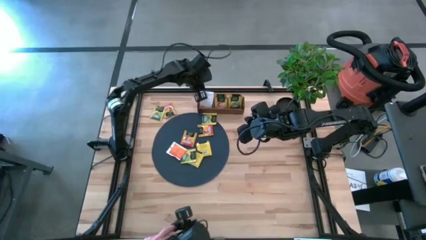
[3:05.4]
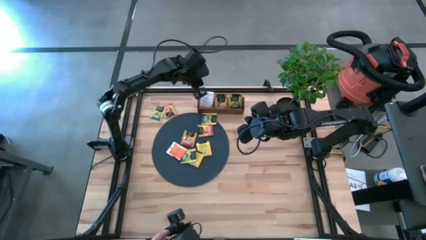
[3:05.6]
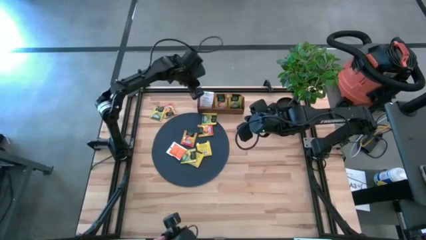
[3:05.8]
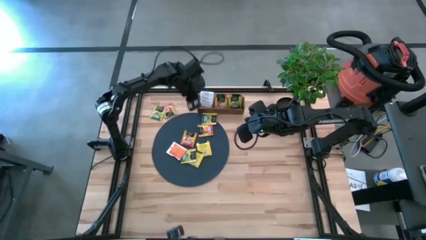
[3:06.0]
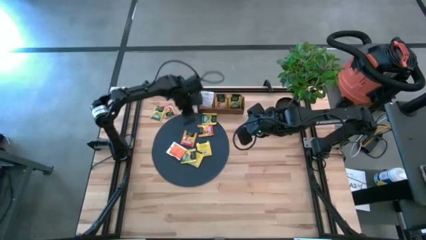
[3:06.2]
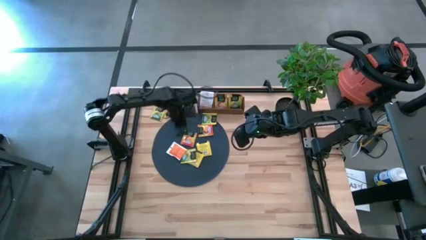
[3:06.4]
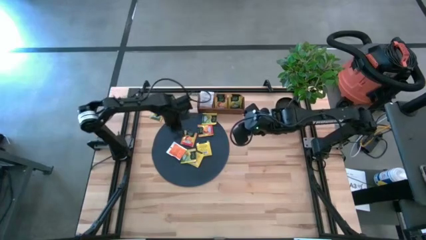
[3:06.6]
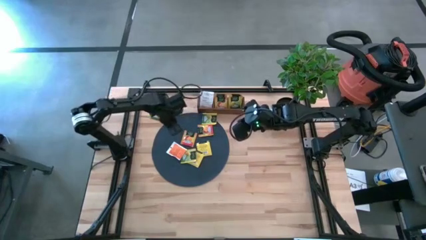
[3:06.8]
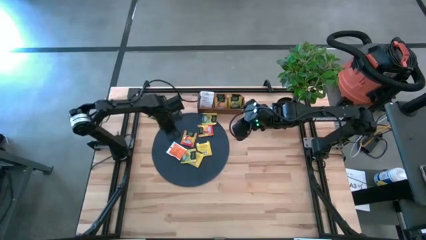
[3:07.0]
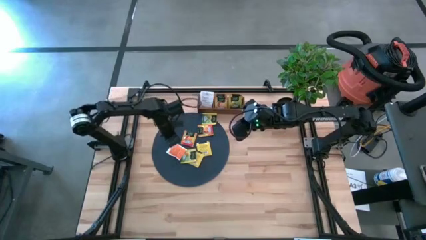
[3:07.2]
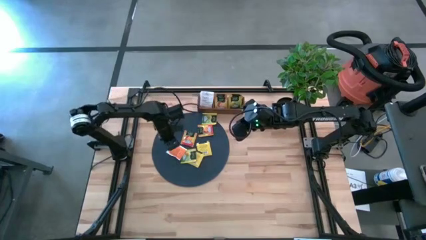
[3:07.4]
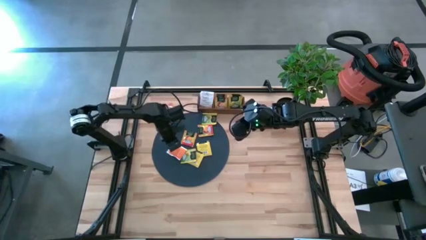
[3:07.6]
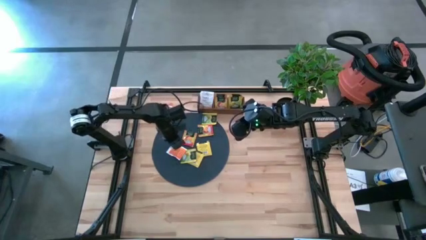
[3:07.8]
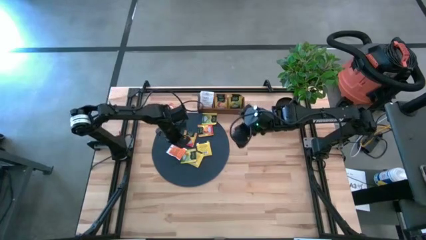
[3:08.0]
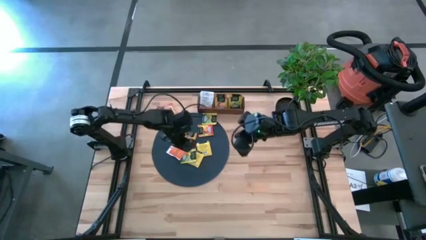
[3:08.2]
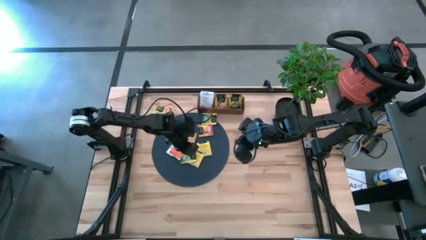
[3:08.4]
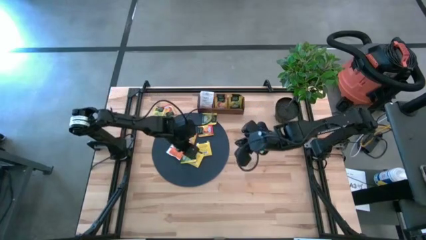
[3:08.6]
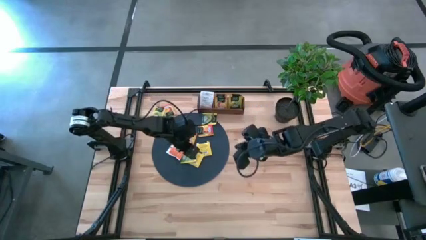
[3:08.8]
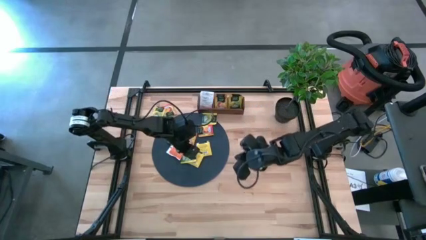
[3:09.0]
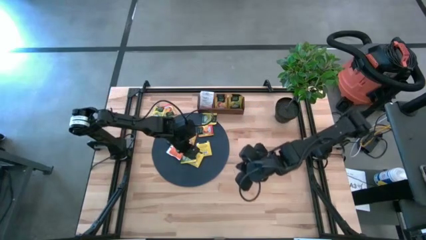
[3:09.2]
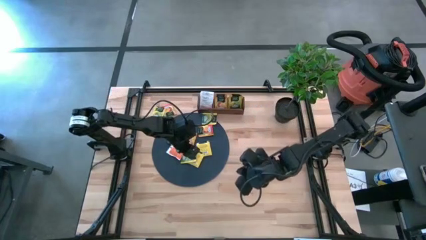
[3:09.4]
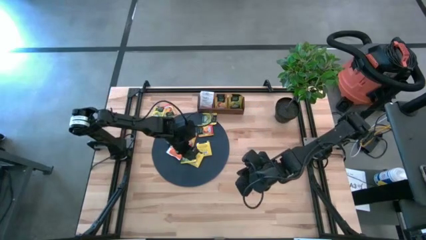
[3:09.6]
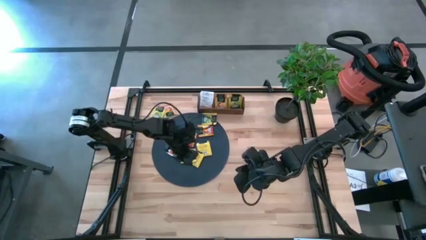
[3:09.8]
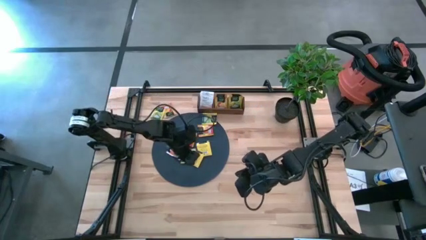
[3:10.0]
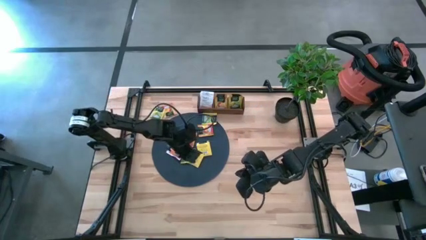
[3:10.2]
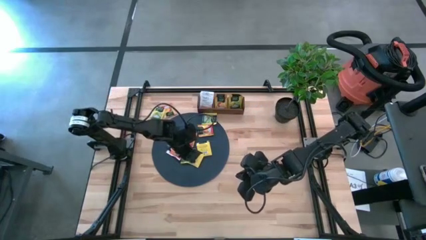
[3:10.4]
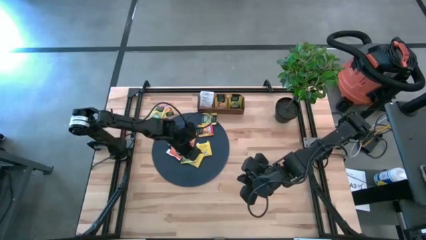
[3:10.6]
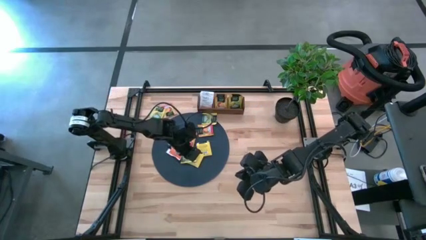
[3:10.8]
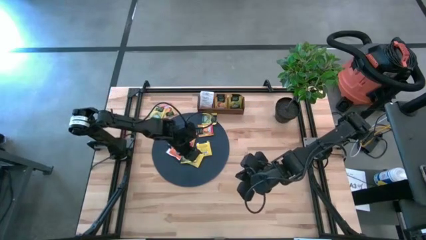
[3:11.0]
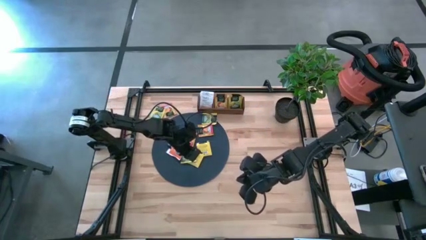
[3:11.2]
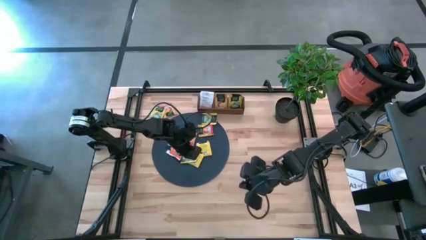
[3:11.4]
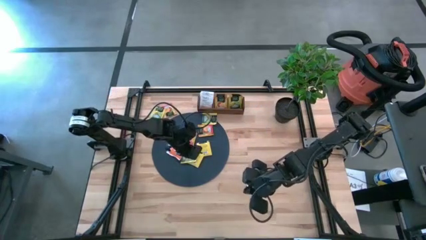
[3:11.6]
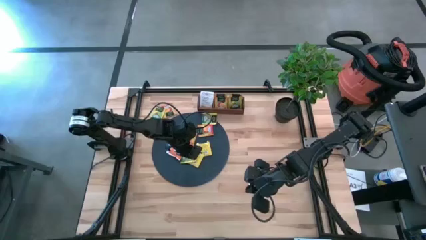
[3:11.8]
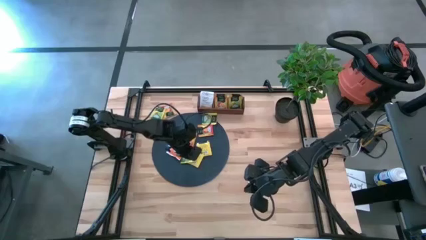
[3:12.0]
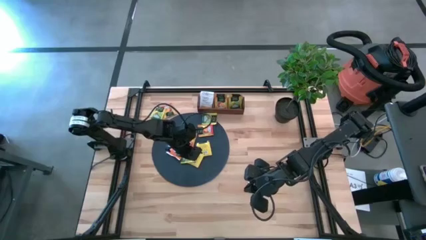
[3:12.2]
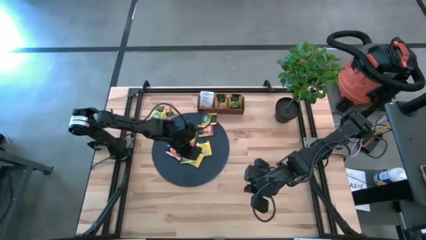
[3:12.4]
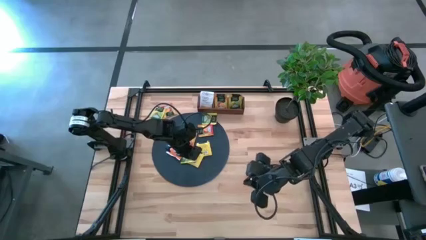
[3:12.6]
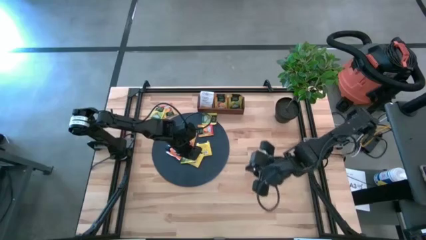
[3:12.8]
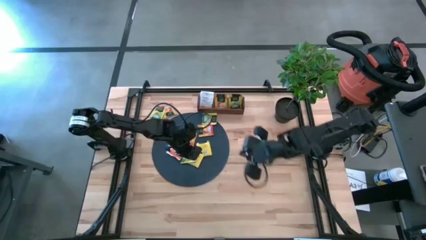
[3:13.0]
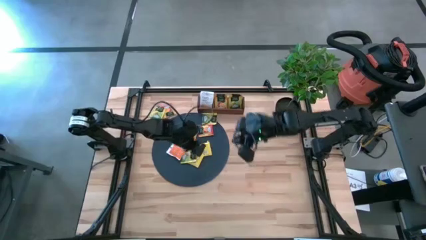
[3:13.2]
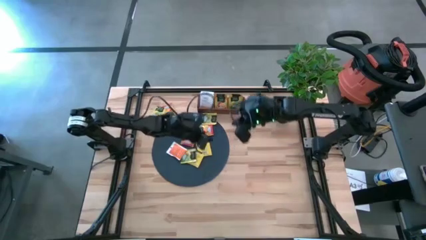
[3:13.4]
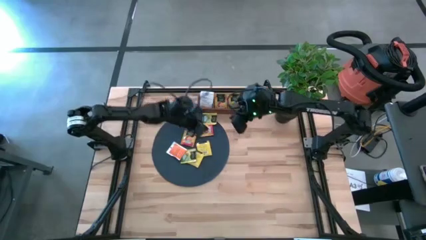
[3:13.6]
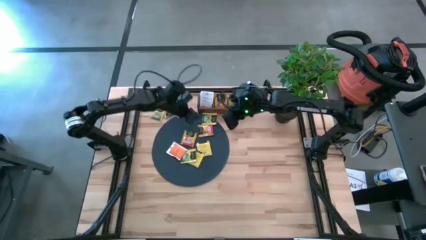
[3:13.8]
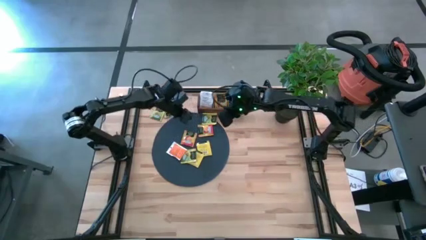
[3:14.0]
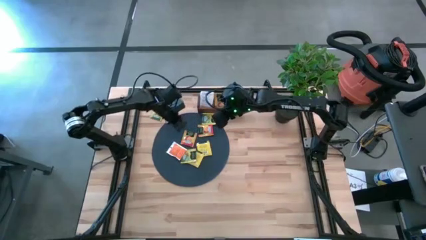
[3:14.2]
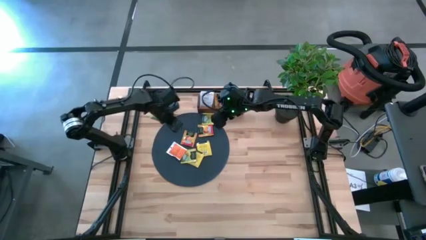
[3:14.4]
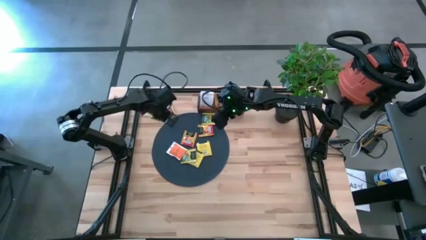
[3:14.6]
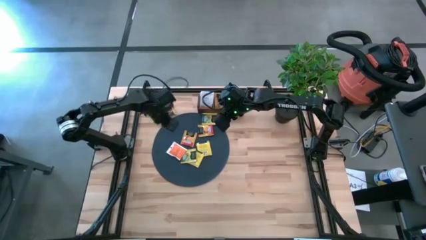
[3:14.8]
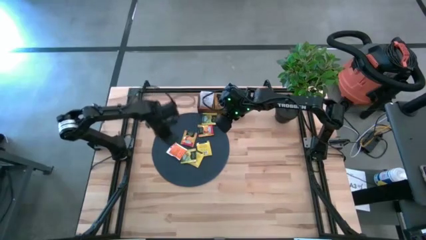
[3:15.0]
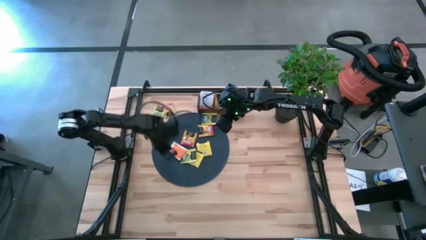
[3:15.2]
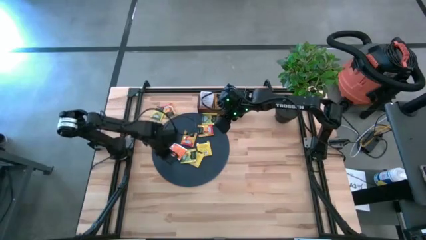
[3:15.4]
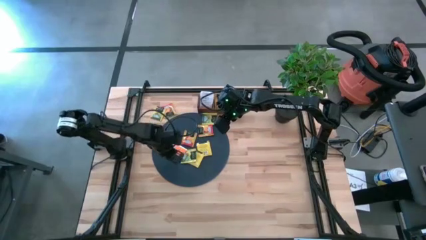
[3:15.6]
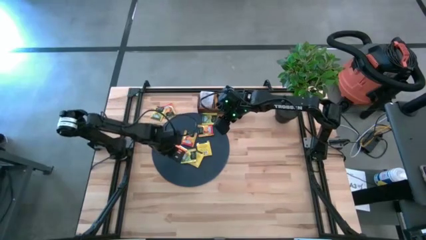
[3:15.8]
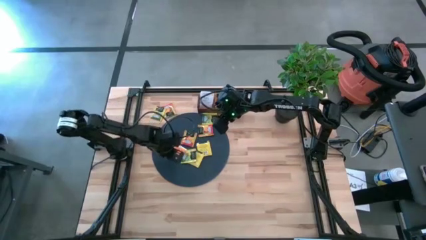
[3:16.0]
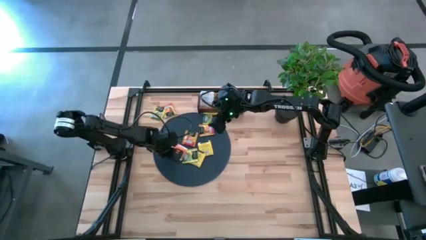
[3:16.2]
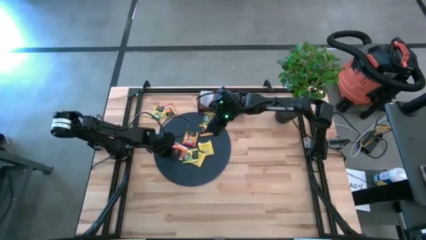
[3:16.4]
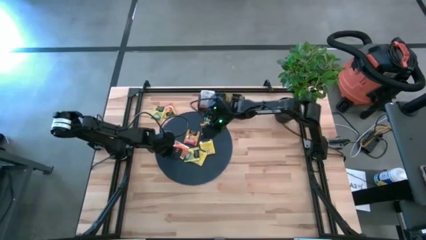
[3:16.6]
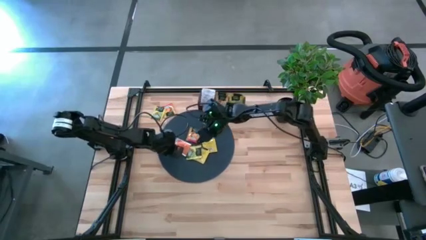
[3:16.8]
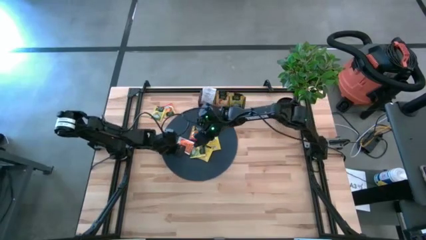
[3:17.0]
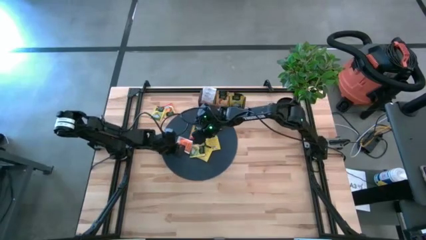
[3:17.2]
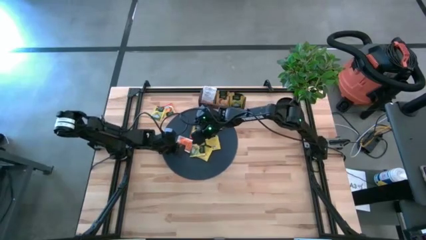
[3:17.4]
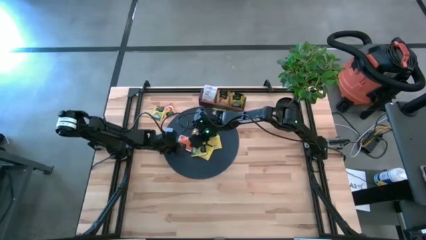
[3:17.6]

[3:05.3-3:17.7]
Task: Pick & Place Tea
Put the orange tea bag into the left section of the wooden organizer

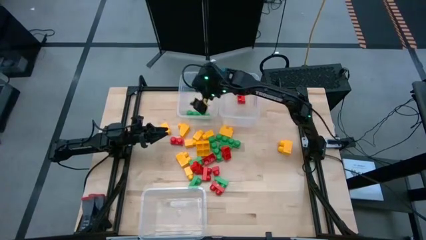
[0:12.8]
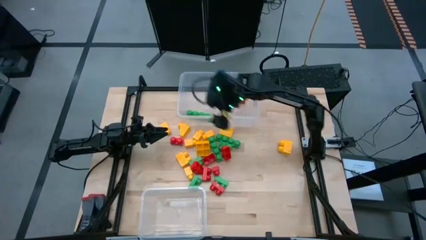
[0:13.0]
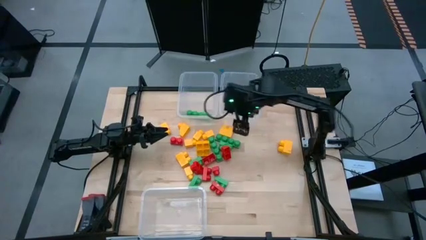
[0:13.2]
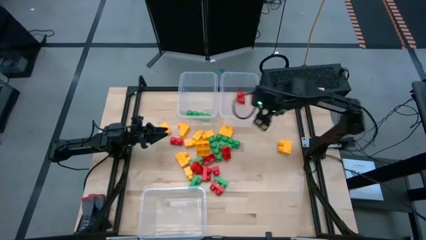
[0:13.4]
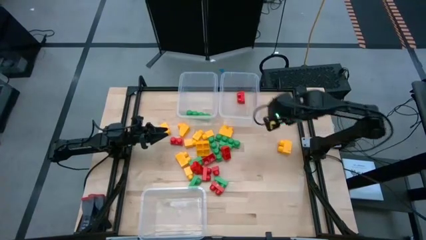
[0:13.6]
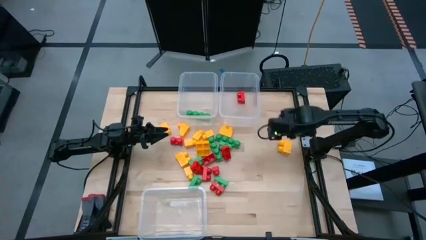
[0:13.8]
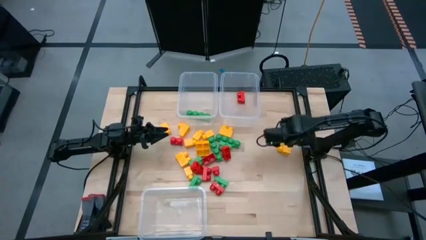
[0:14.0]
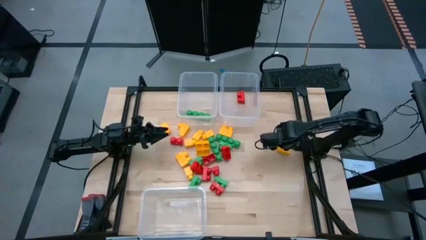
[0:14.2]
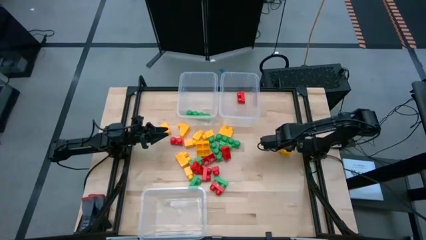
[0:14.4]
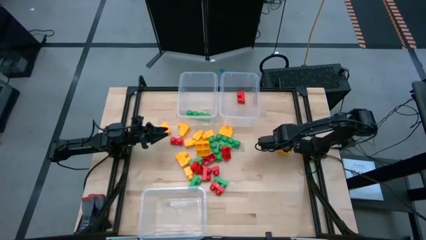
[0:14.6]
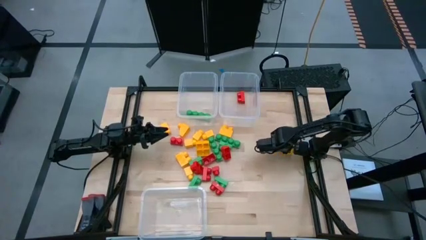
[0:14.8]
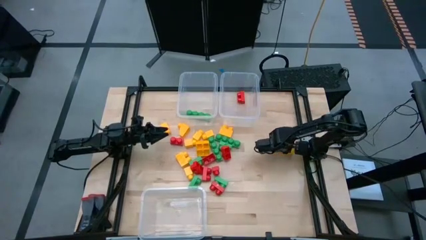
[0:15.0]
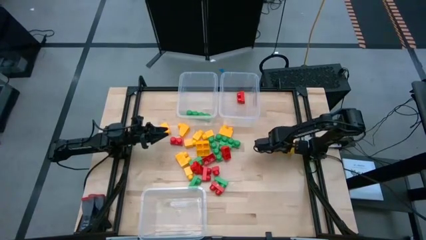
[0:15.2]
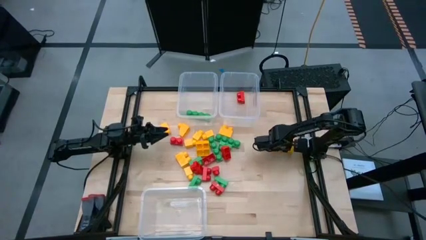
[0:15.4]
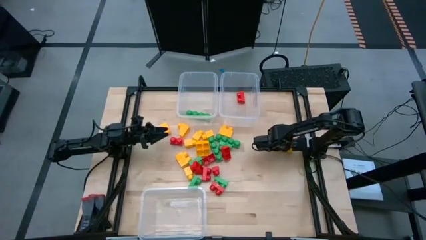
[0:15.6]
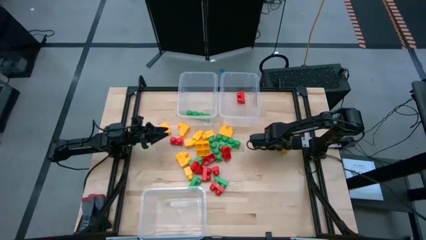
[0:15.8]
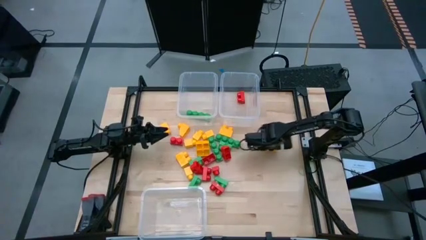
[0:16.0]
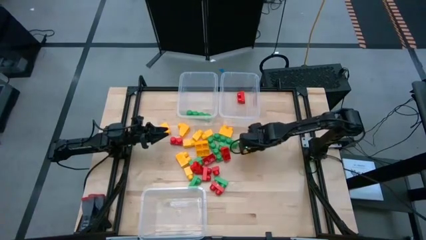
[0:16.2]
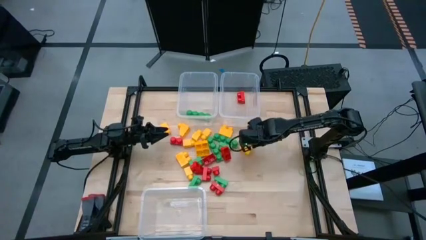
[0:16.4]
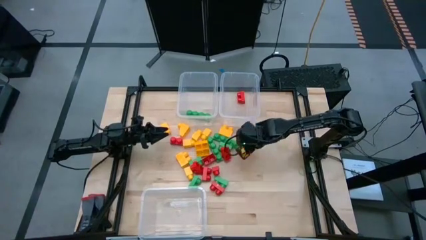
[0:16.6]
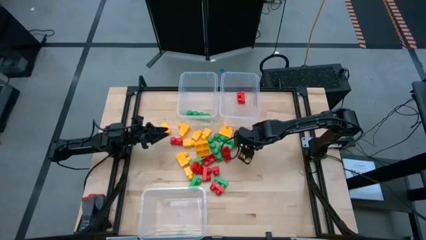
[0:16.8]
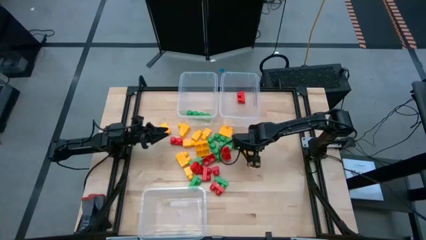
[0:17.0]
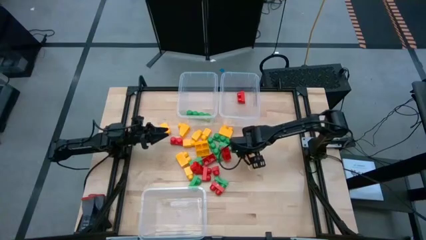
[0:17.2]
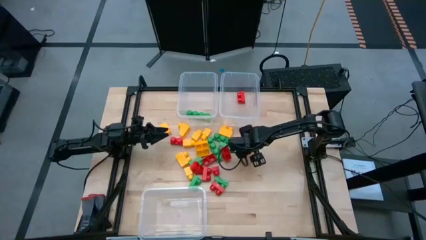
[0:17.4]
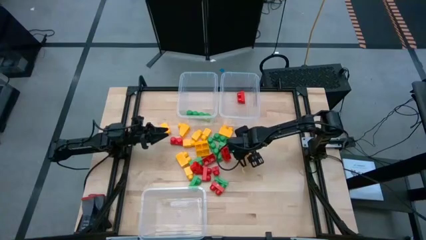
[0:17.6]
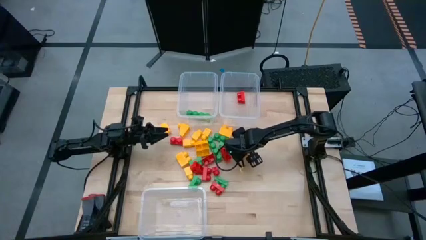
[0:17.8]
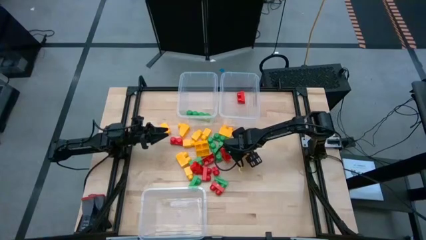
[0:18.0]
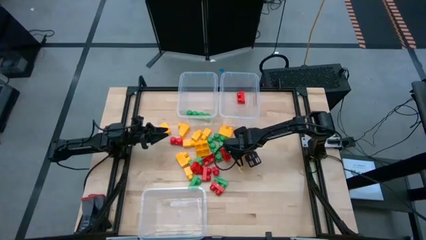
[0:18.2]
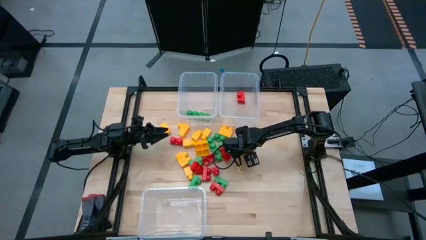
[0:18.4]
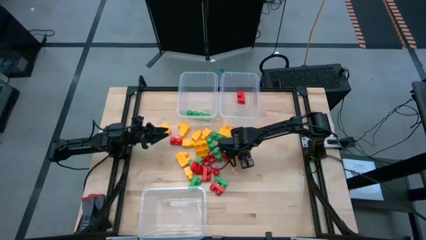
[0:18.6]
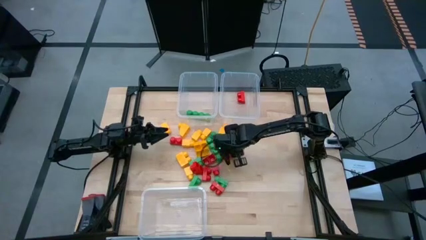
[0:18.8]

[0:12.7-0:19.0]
Task: Sort blocks
Put the yellow game piece into the bottom transparent bin
